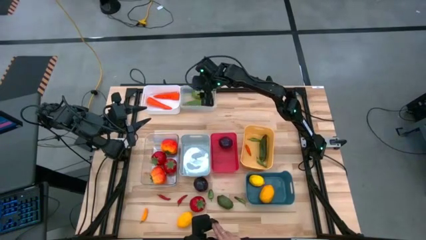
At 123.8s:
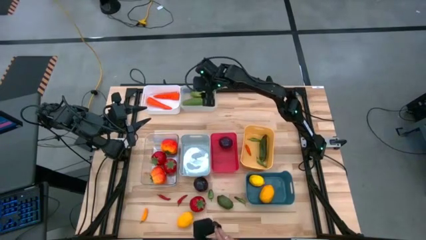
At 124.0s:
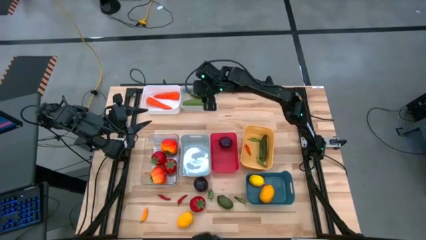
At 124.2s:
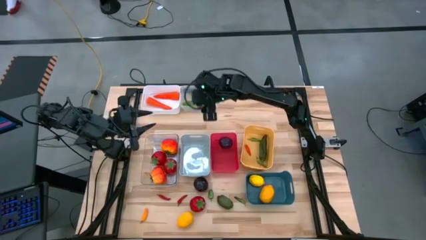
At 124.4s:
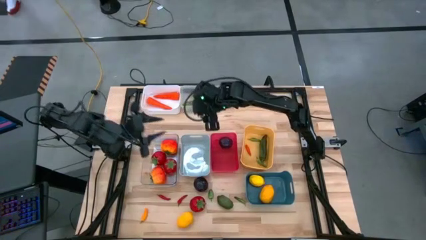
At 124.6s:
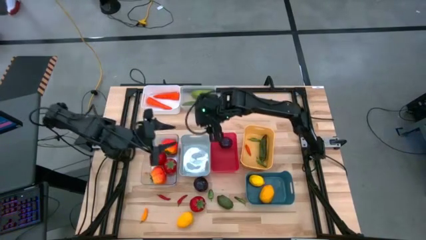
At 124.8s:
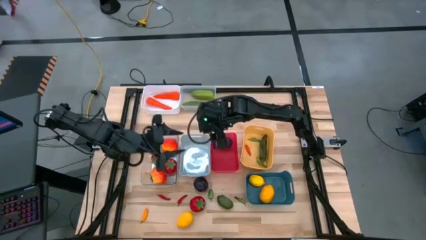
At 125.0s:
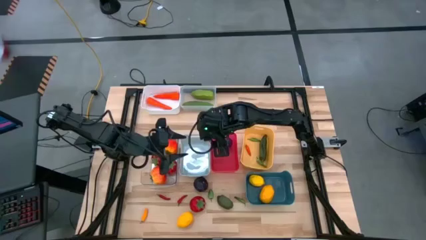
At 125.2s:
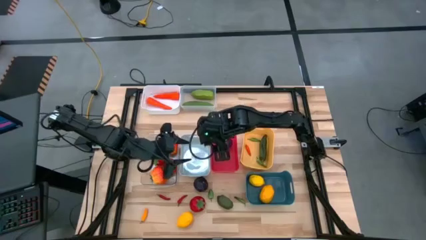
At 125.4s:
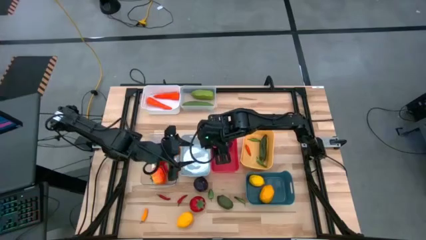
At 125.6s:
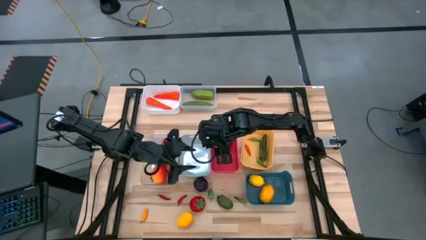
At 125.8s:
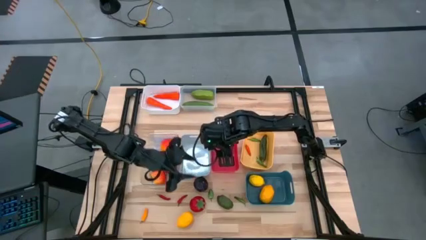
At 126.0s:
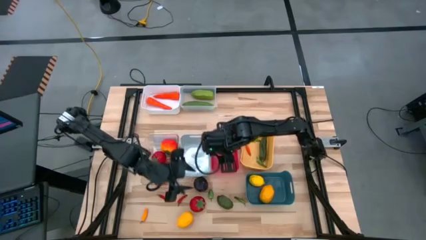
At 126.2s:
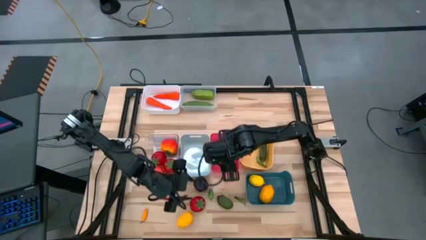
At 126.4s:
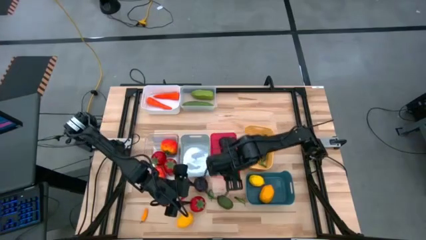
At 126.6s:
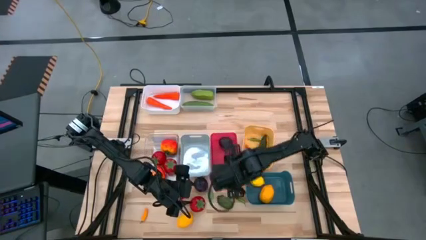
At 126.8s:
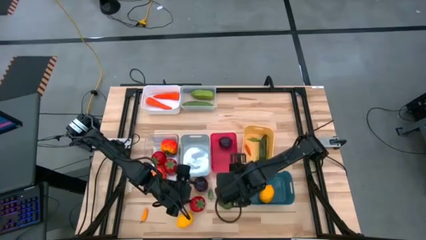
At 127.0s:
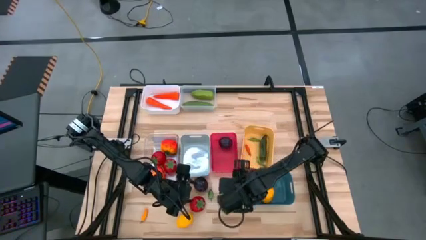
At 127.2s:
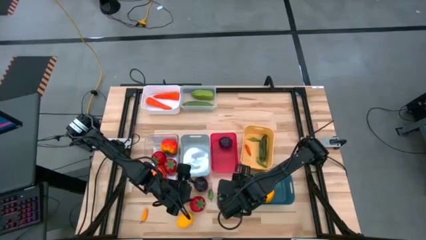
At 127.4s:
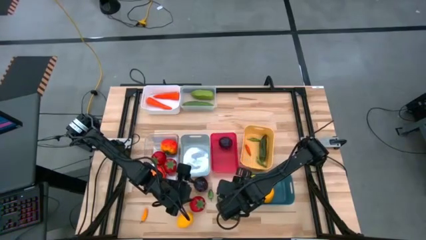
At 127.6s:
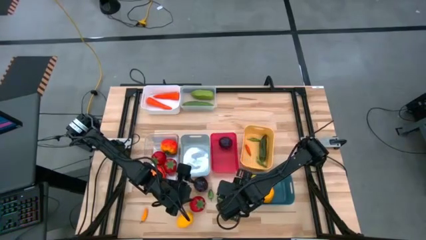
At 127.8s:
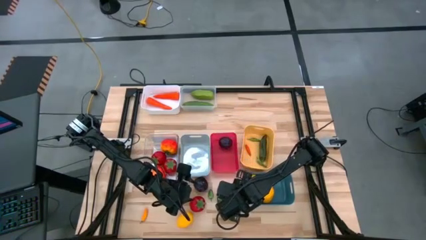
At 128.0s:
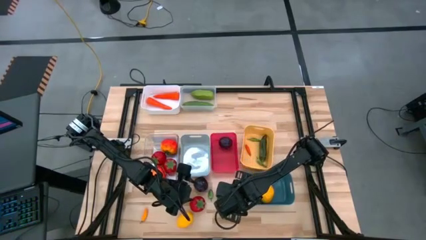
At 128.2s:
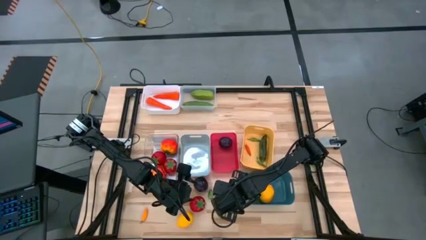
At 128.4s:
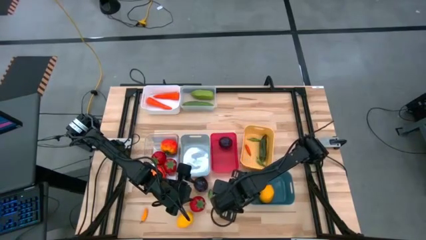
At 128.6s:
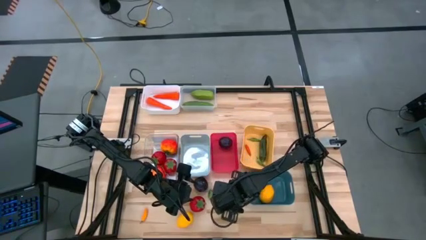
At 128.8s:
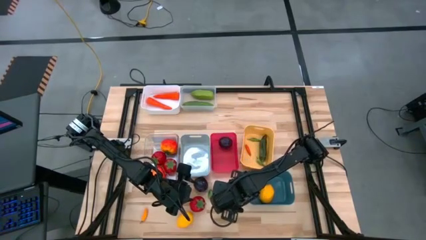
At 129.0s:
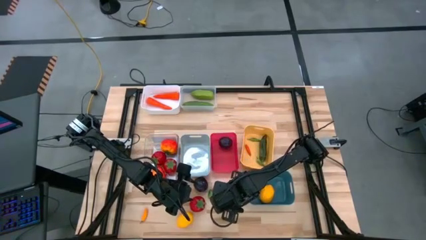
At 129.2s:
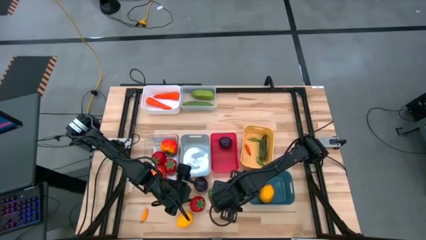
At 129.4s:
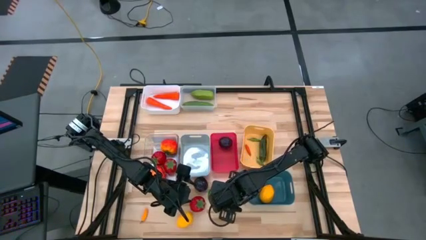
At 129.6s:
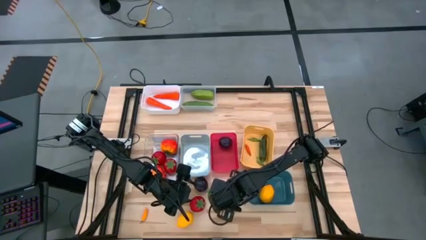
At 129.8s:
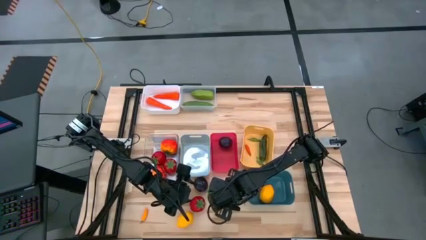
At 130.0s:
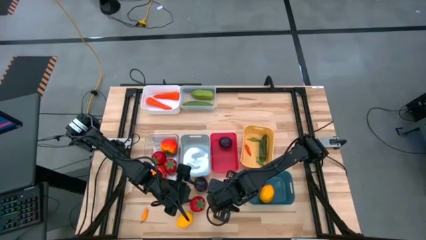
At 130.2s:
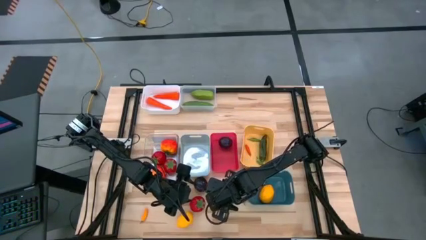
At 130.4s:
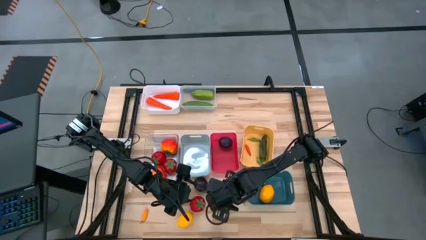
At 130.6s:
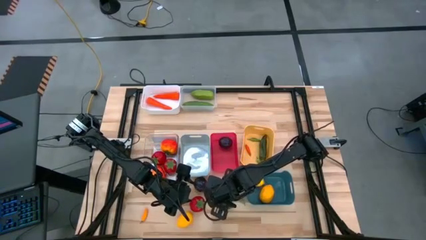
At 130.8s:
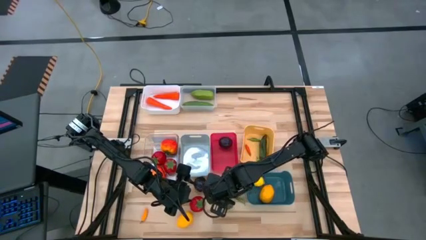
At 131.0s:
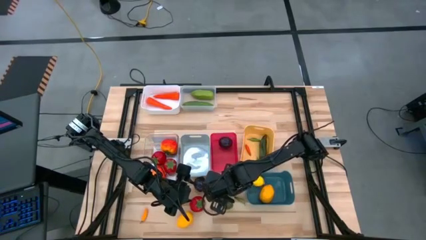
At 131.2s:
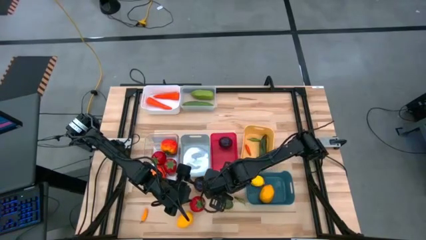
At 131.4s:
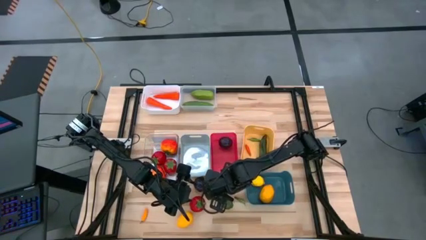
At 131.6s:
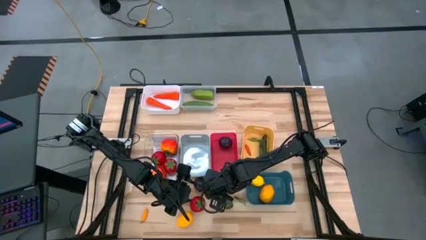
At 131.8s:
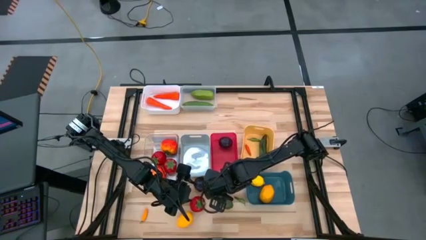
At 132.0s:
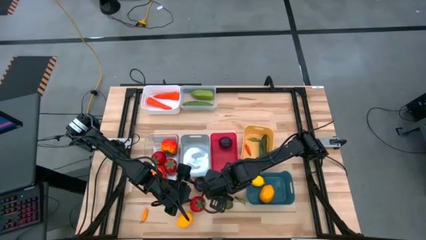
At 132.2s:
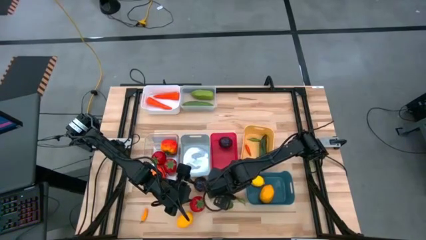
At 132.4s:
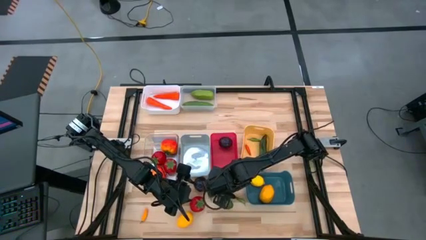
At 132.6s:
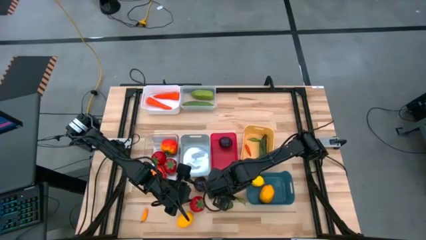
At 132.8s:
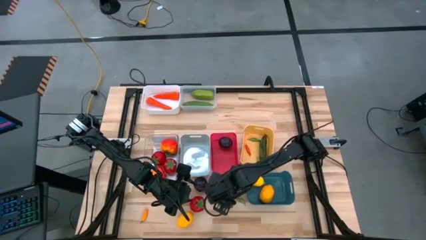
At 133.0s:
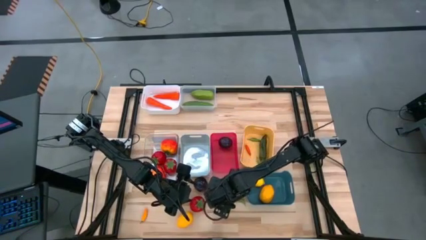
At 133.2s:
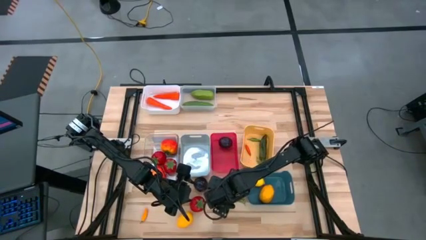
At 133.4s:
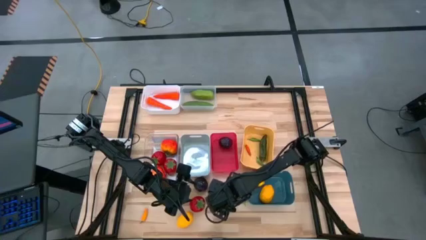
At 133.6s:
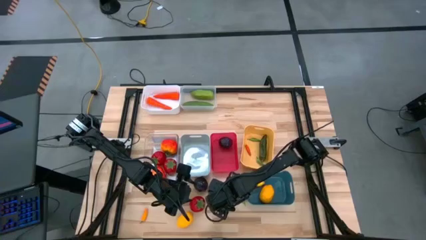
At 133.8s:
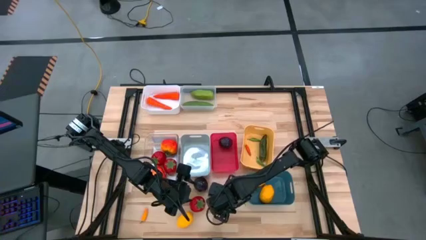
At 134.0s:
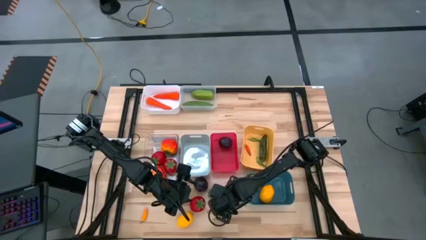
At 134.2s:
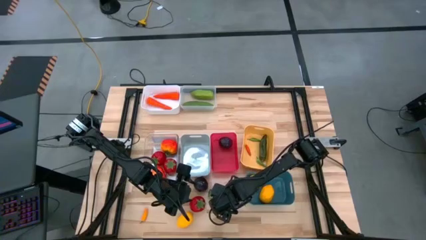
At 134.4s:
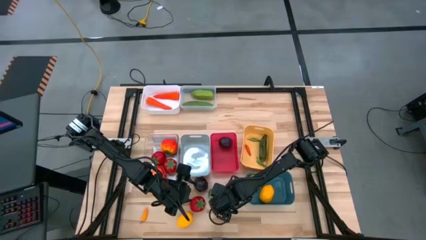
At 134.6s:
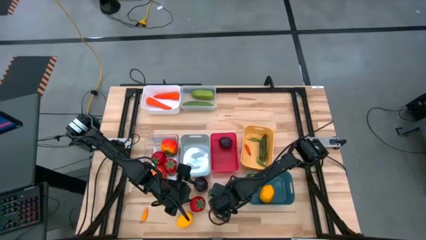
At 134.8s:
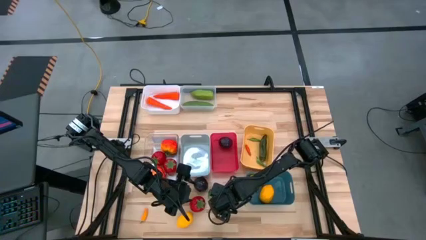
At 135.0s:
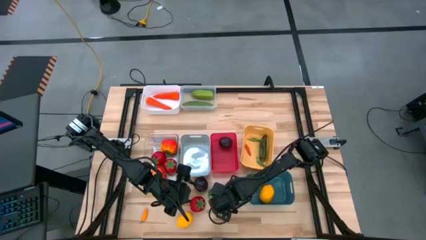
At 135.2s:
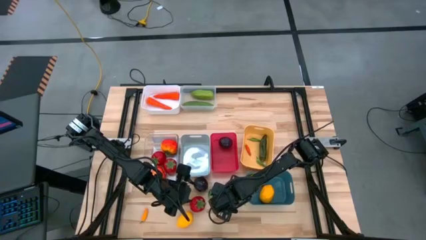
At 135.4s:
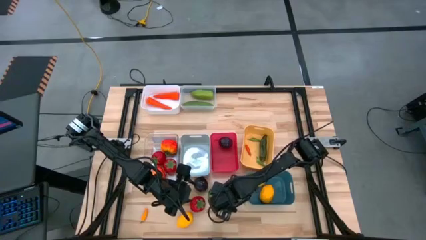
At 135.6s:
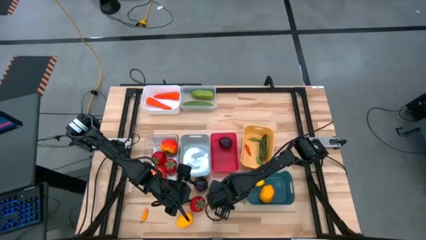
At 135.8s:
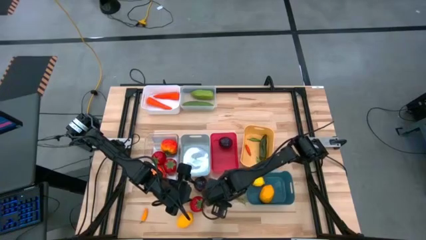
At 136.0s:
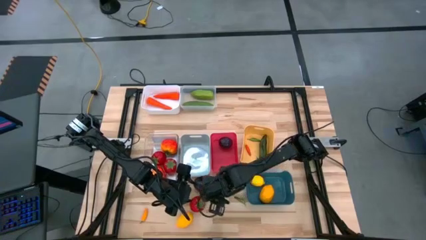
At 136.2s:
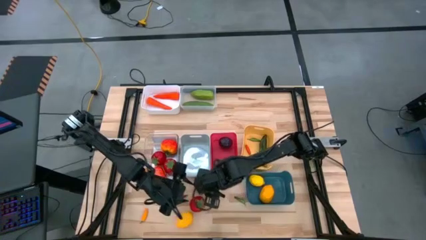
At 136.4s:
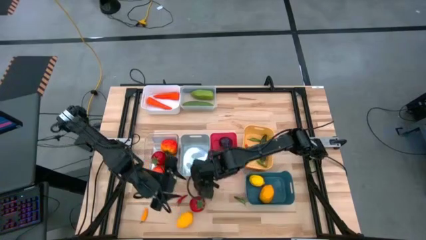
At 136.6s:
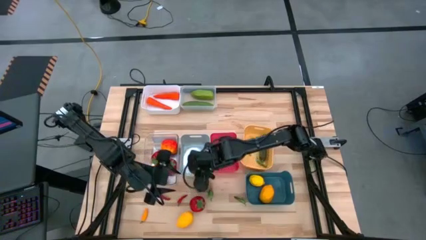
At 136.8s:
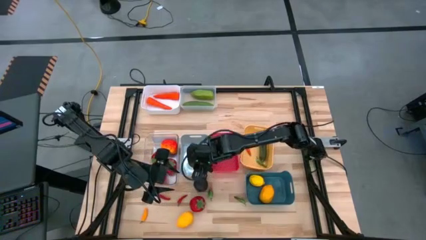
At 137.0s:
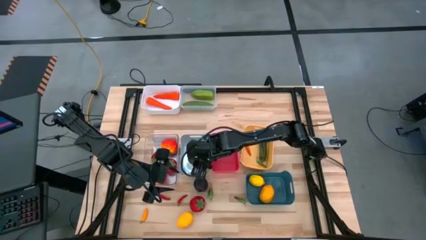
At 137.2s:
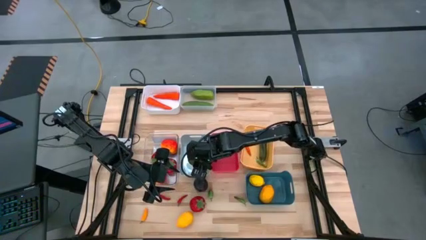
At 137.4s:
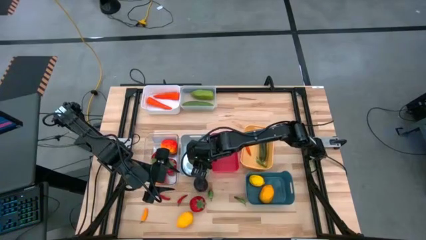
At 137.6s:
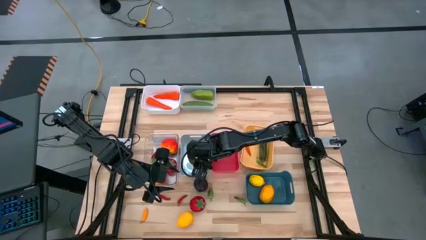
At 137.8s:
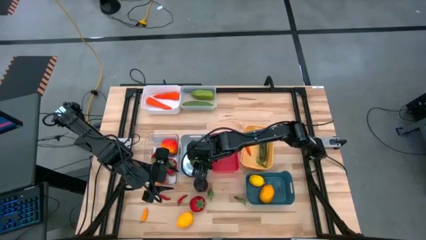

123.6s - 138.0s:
Task: Sort produce into baskets
Put the lime into the gray bin

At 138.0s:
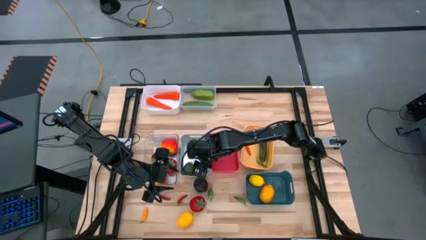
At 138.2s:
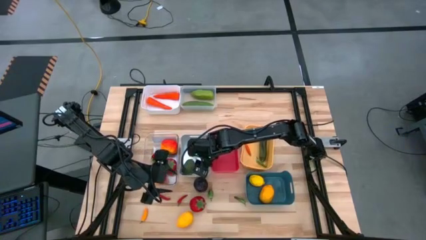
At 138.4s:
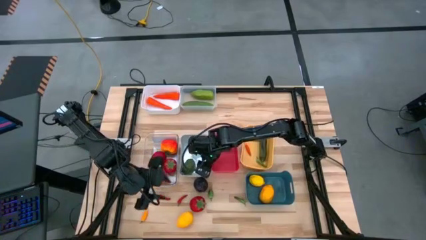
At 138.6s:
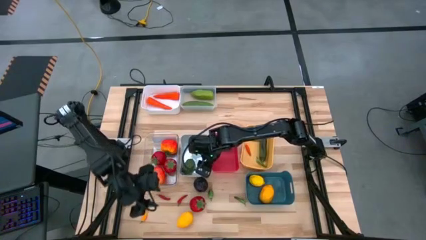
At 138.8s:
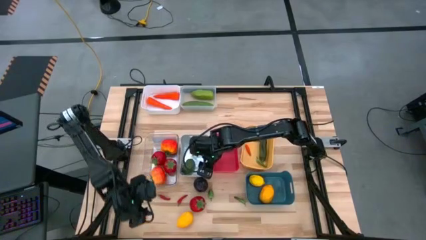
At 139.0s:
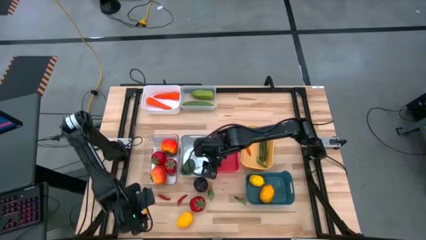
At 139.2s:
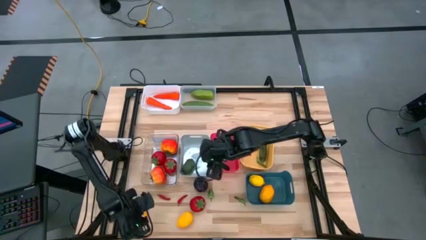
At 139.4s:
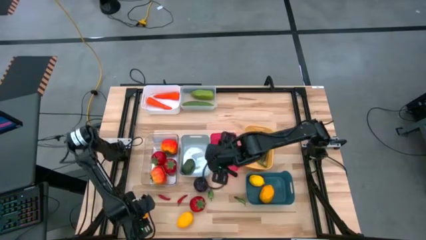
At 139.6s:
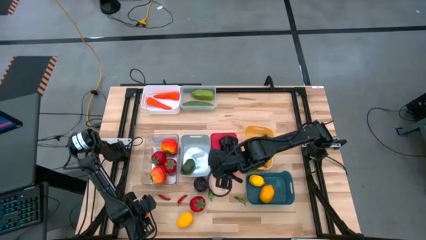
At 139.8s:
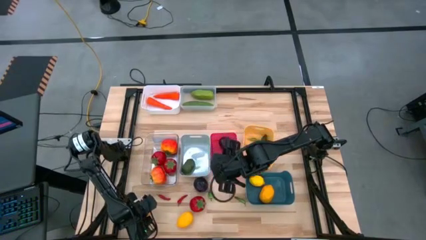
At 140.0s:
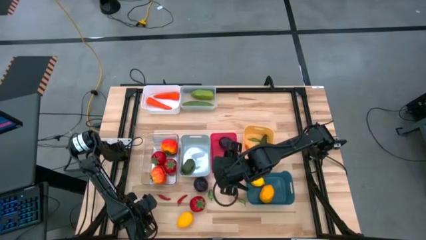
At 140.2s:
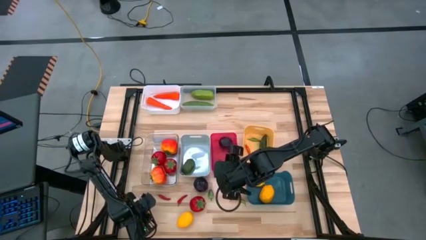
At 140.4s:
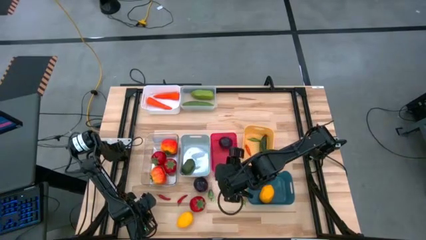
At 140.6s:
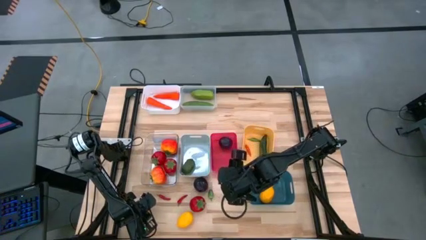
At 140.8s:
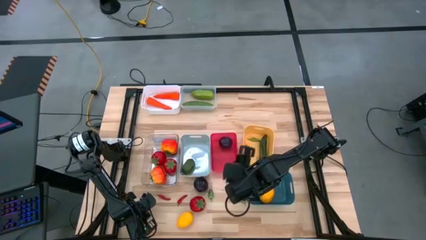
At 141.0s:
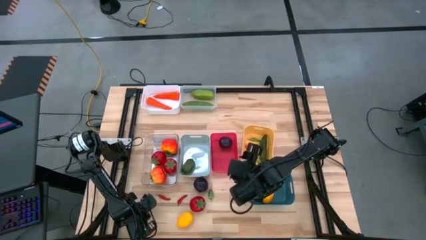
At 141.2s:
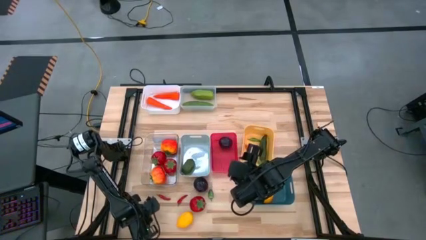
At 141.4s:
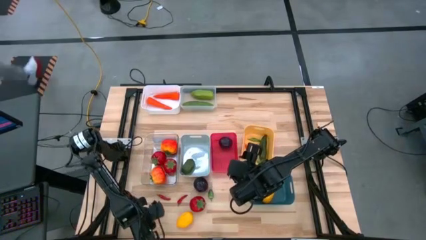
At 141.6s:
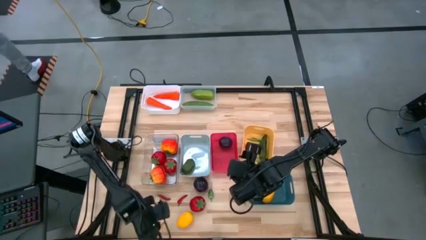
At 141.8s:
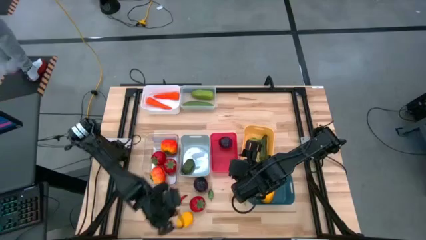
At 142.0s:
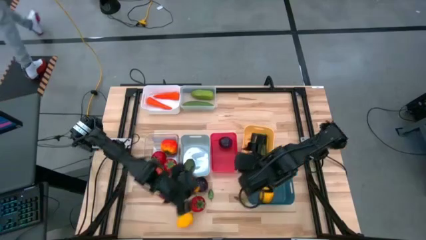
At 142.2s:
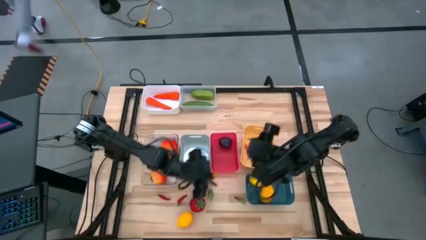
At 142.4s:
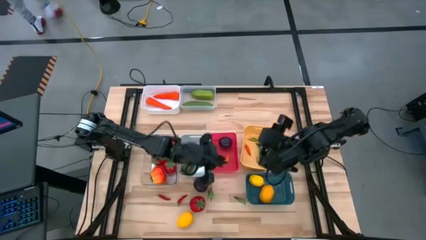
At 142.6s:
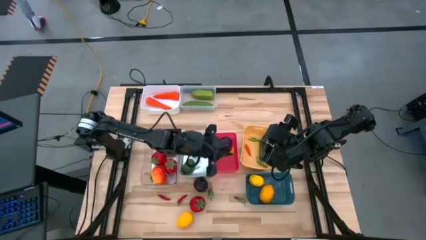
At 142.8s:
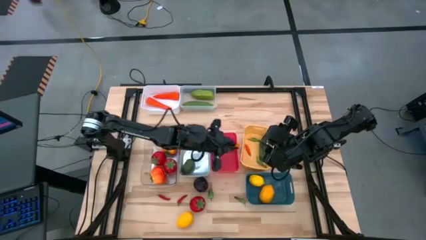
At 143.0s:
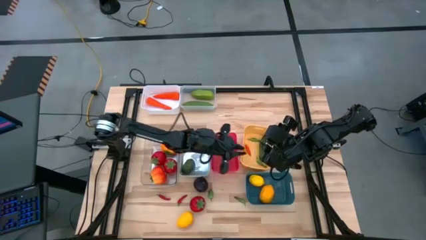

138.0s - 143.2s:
Put the yellow chili into the yellow bin
